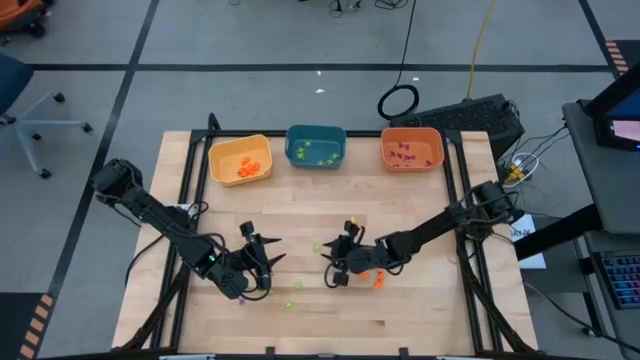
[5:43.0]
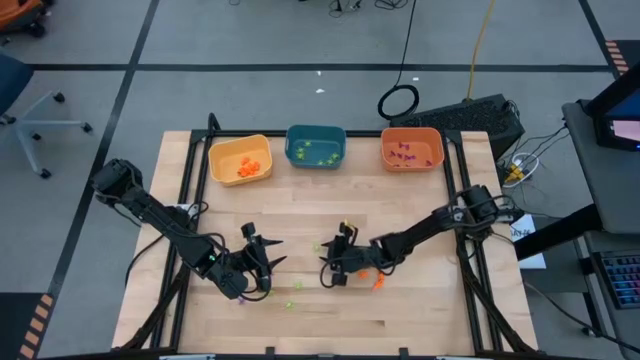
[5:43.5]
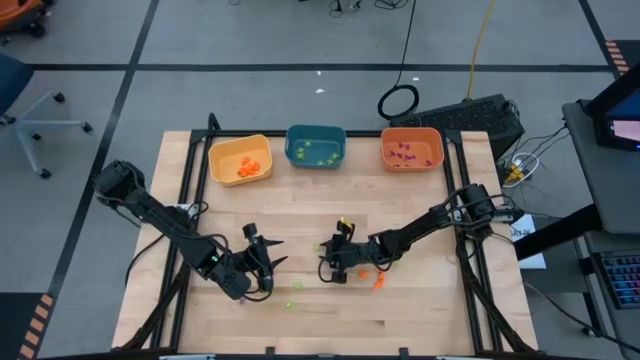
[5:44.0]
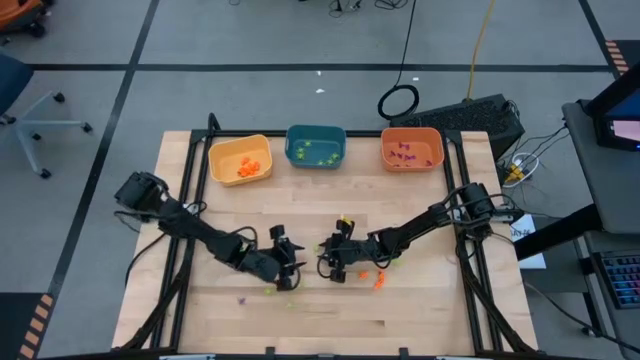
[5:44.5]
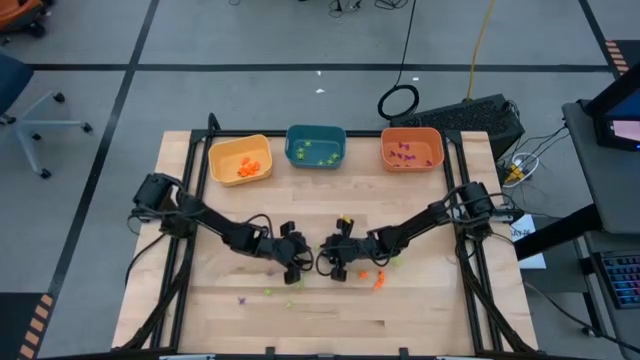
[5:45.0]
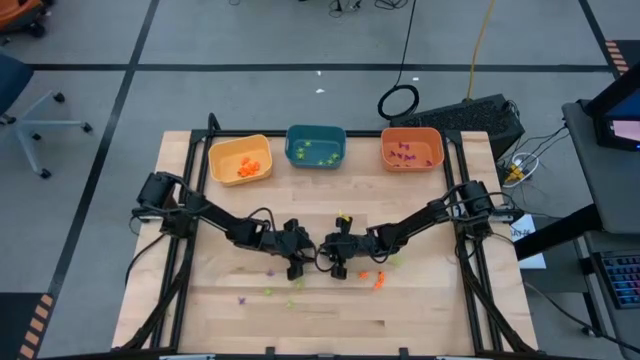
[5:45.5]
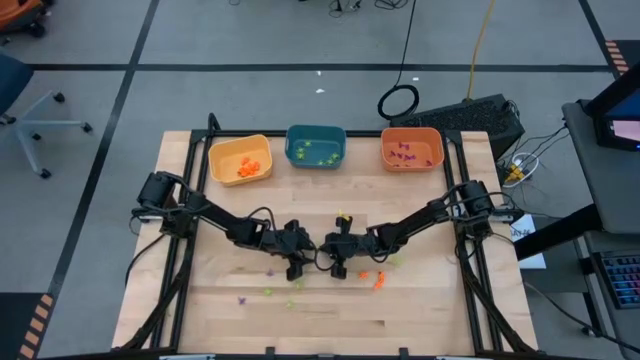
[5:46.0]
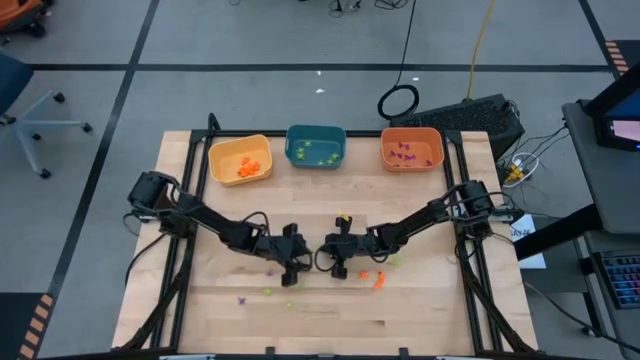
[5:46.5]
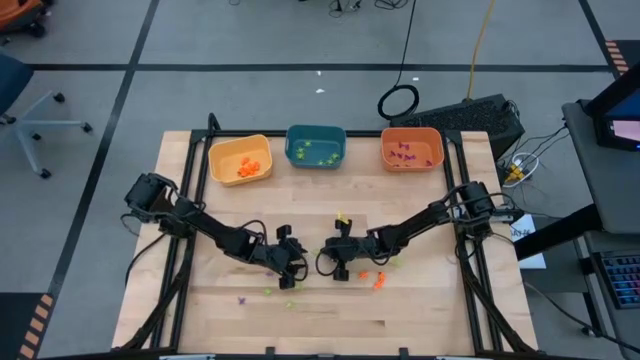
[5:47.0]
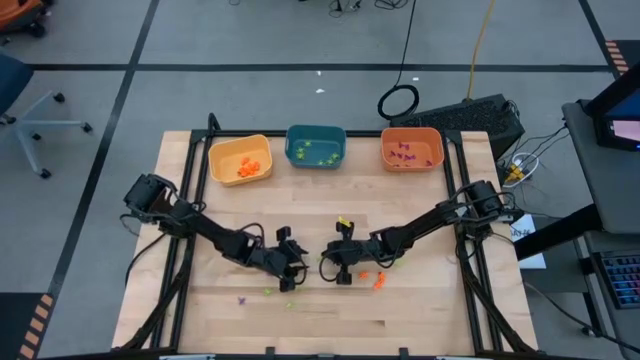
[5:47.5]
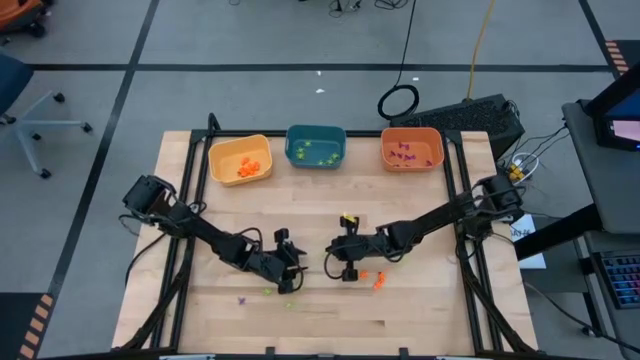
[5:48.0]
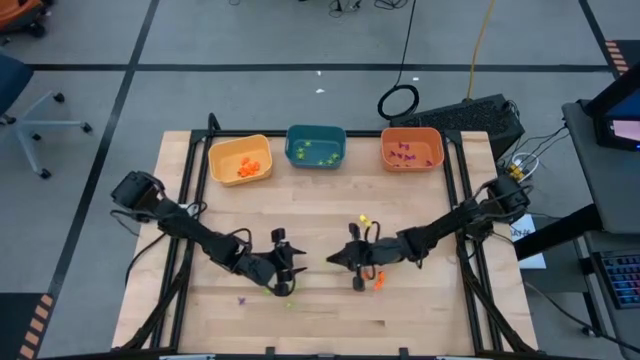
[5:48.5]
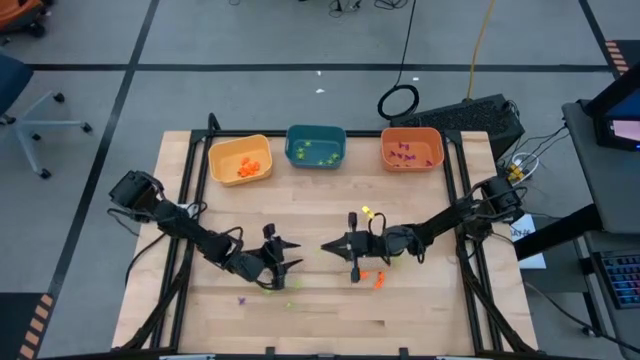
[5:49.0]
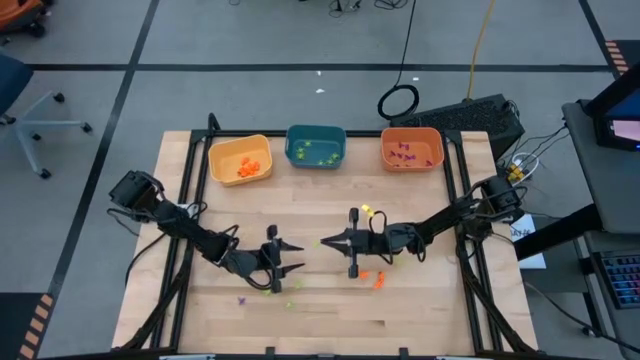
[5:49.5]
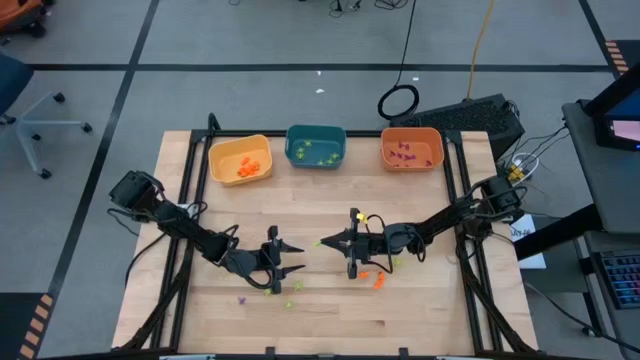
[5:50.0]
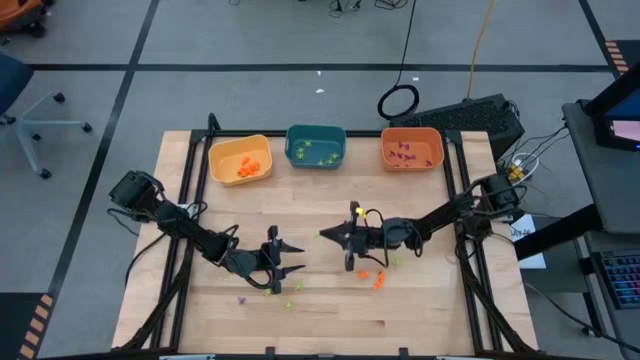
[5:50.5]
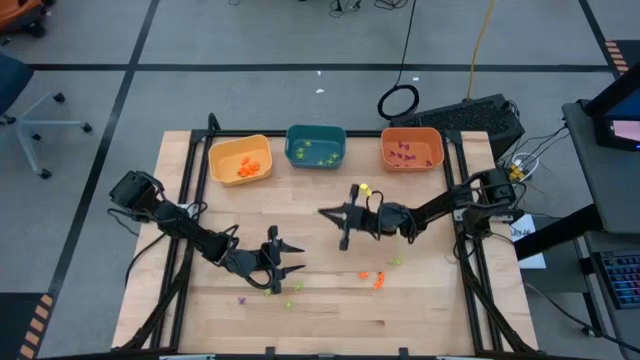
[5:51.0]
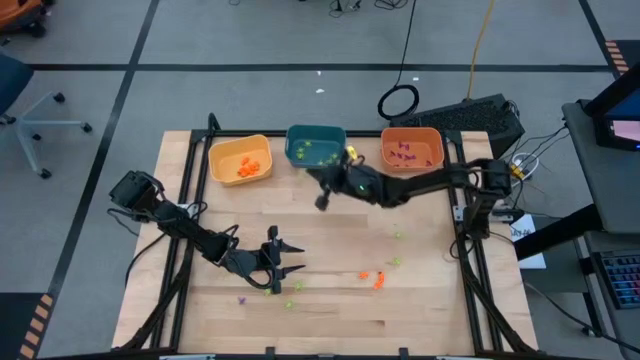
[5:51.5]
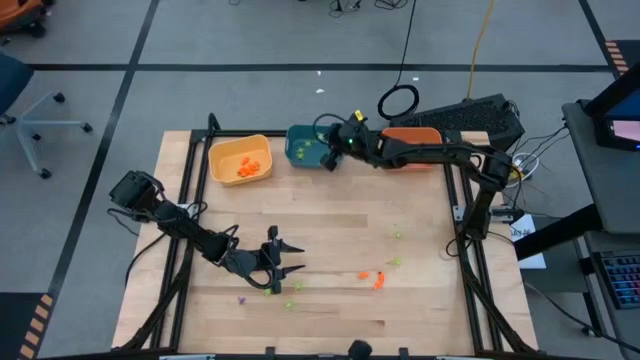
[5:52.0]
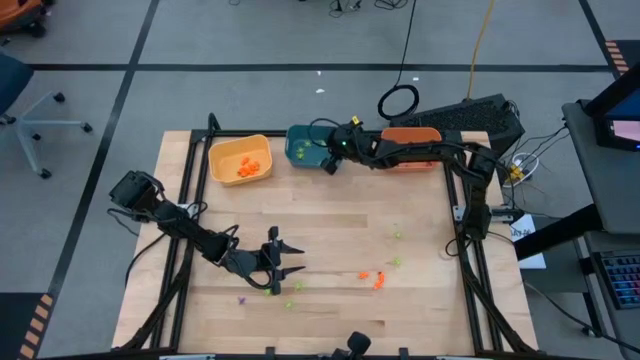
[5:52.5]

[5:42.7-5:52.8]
Task: Sort Halloween decoration
Put the green spider toy into the blue bin

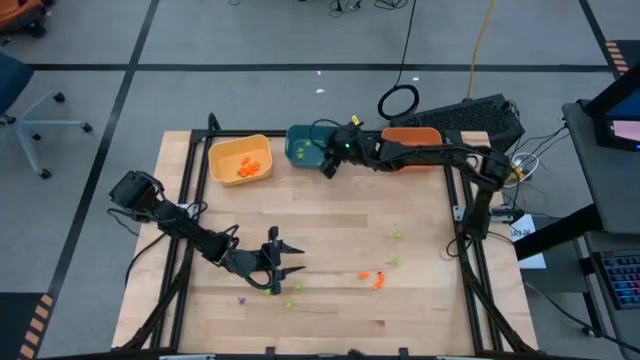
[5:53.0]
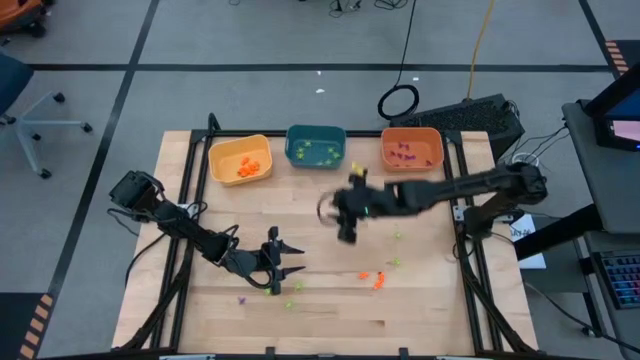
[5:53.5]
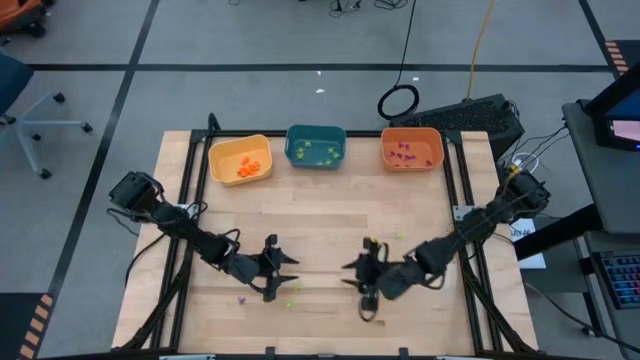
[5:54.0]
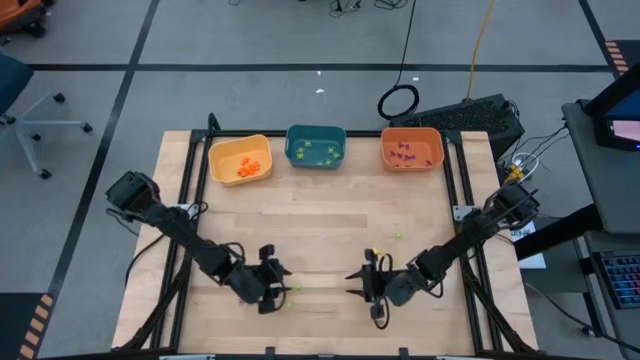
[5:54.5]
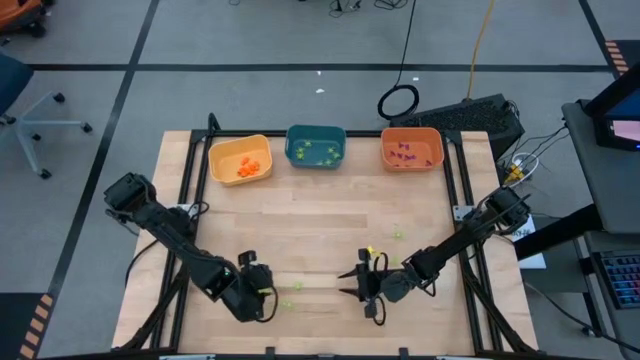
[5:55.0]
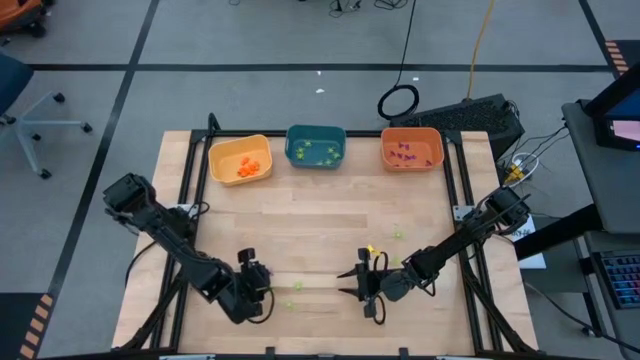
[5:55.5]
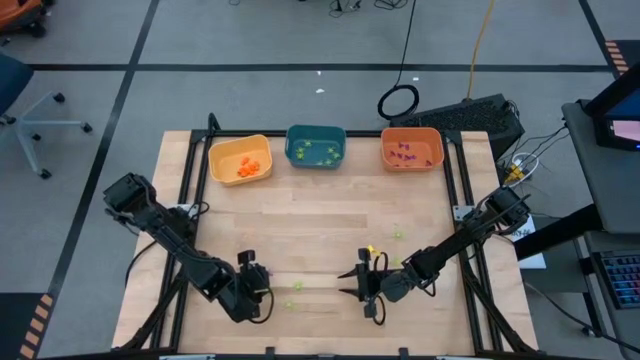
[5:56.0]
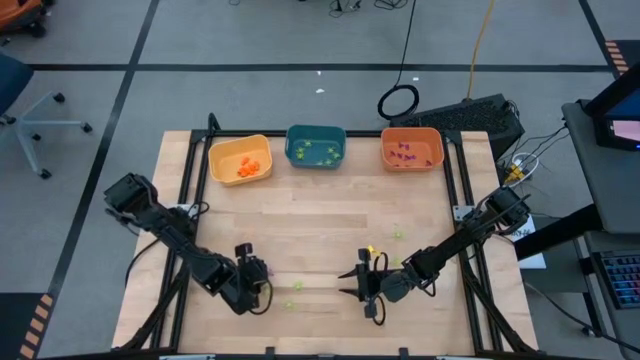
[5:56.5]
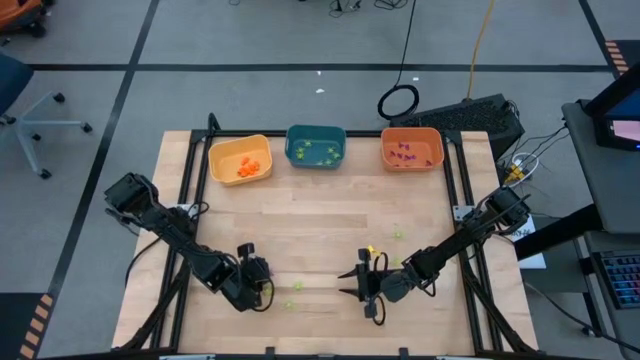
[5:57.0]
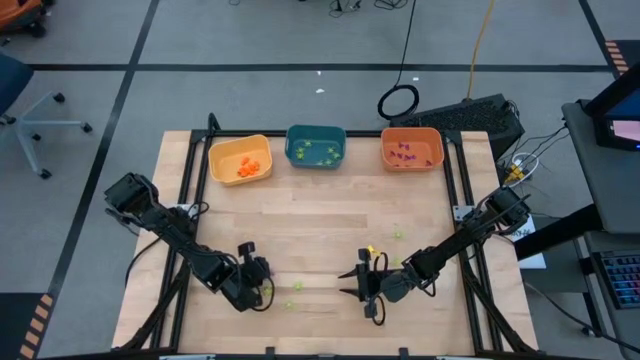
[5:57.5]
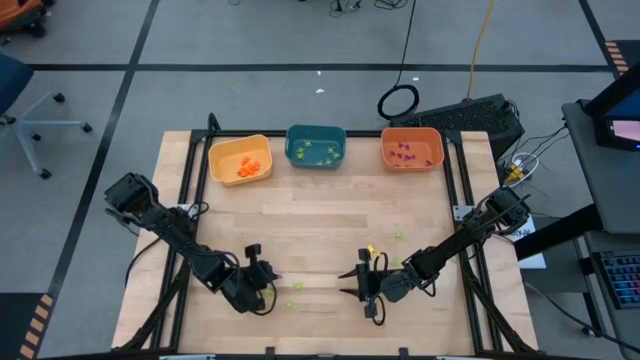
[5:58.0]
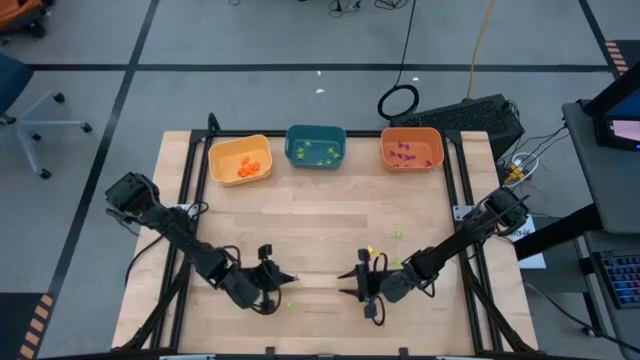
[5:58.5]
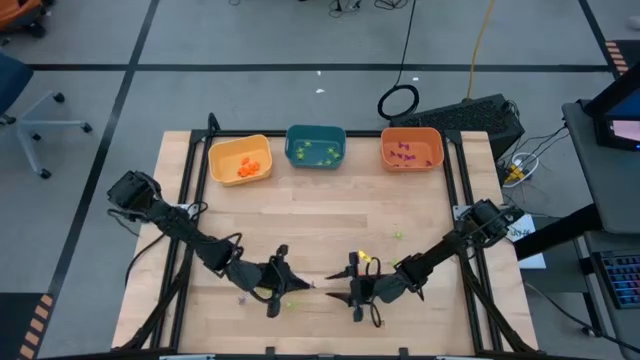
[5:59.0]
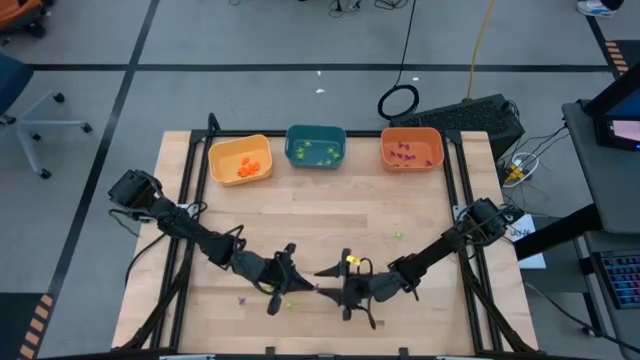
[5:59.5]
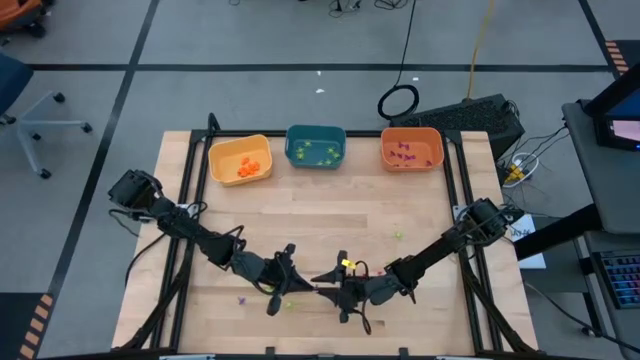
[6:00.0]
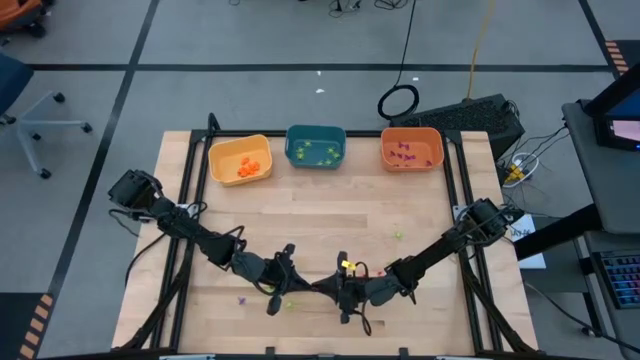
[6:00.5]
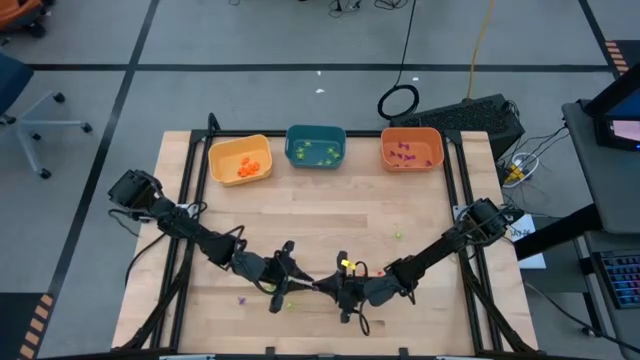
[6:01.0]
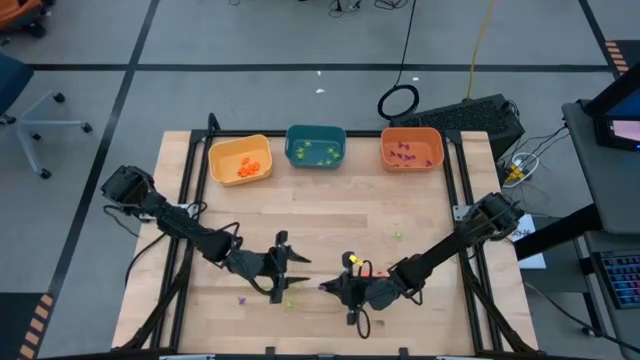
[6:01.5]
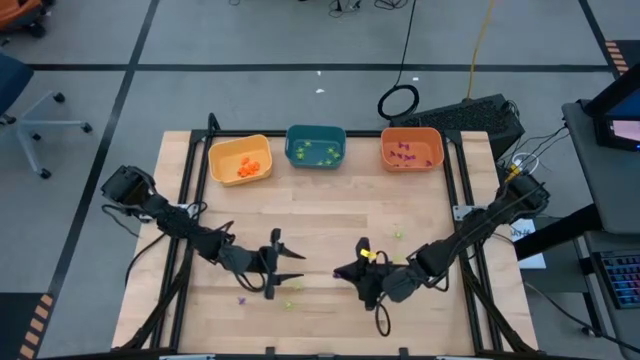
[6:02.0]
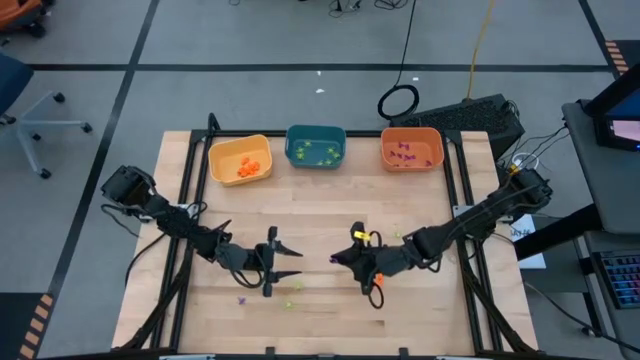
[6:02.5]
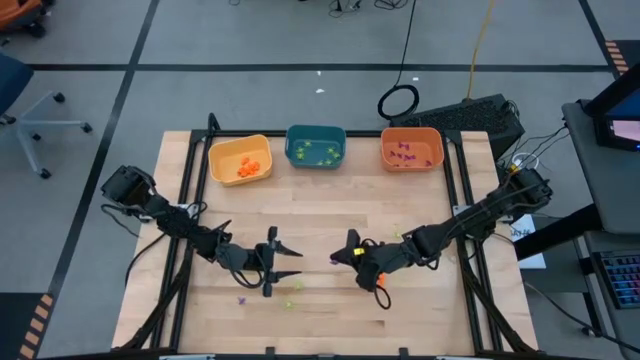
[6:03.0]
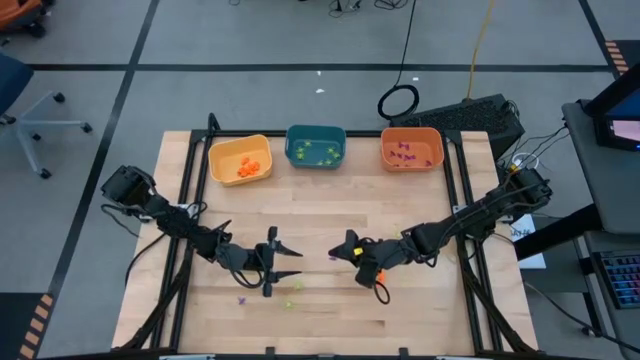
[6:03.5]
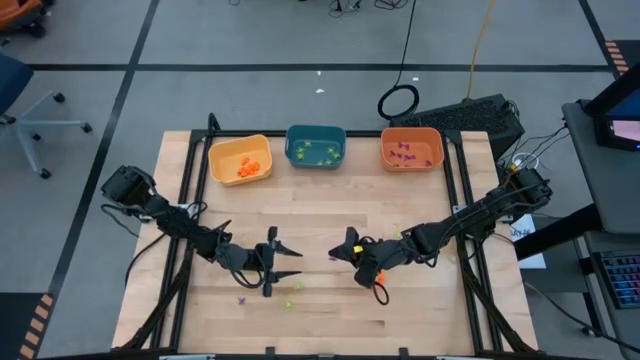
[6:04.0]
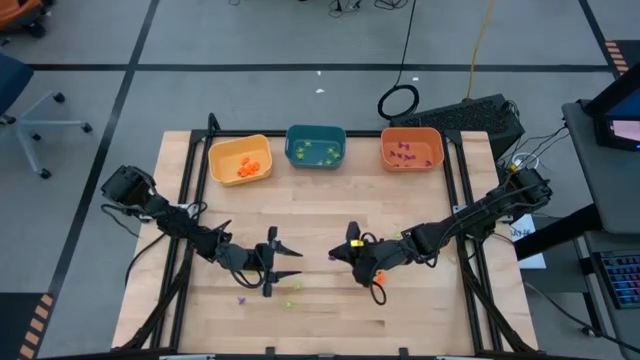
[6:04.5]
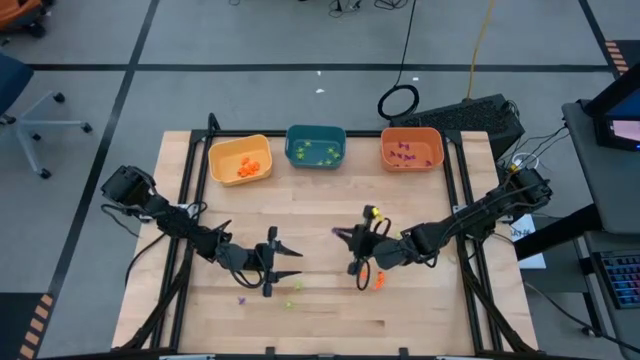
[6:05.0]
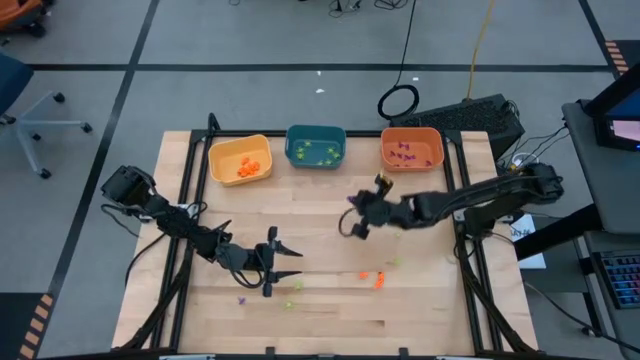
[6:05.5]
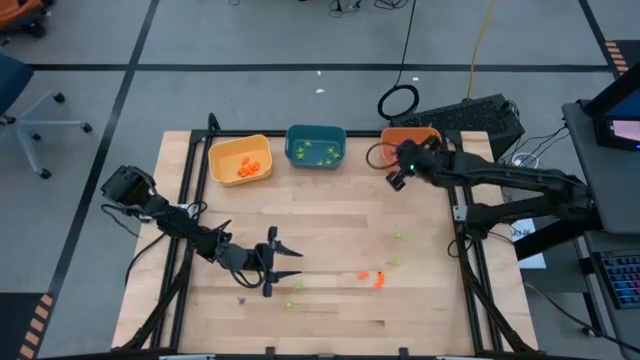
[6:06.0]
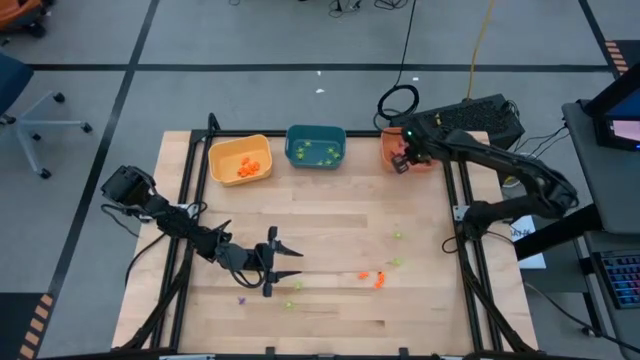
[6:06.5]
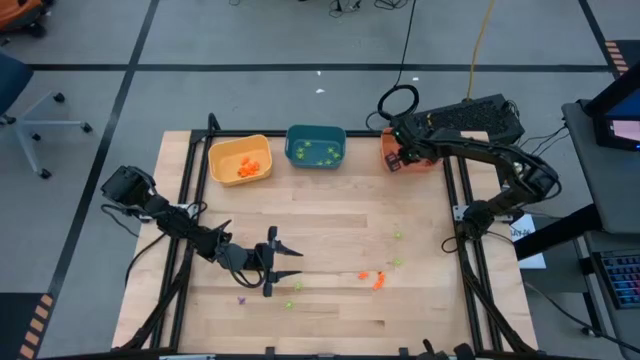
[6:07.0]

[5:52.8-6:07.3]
Put the violet witch hat toy into the orange bin
